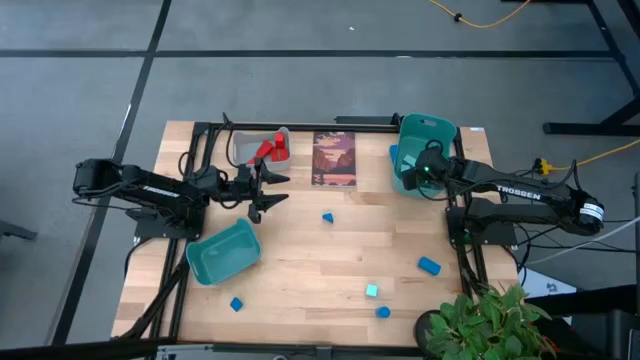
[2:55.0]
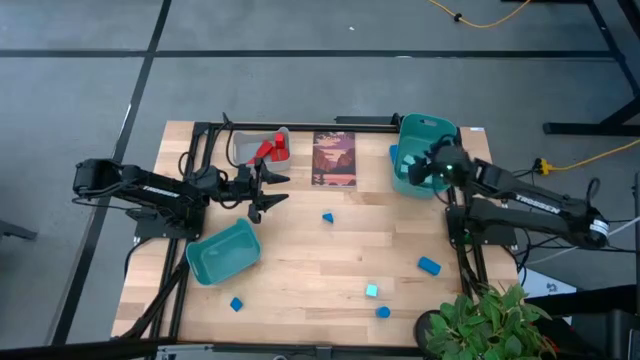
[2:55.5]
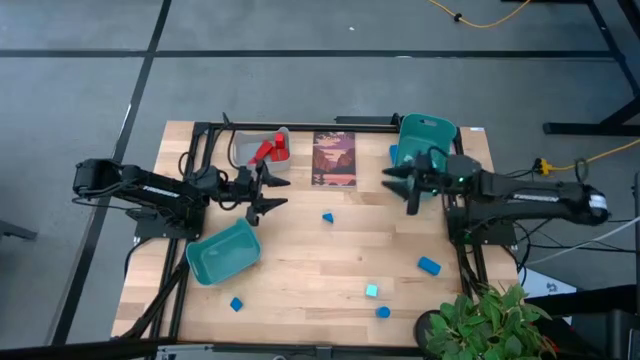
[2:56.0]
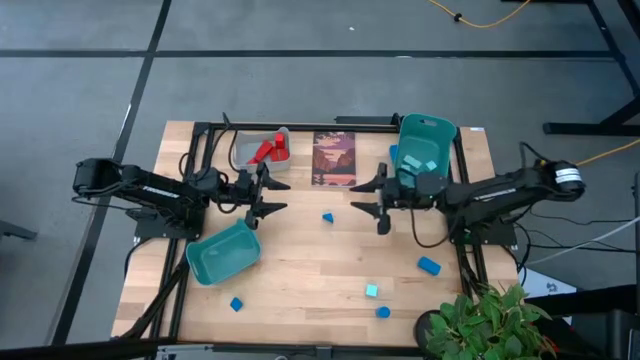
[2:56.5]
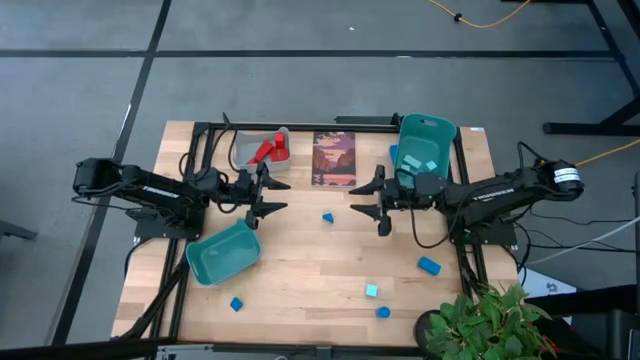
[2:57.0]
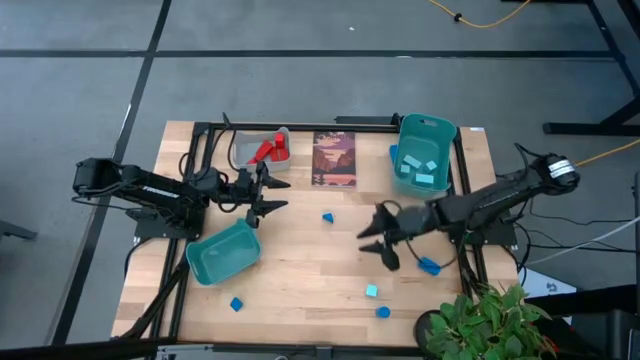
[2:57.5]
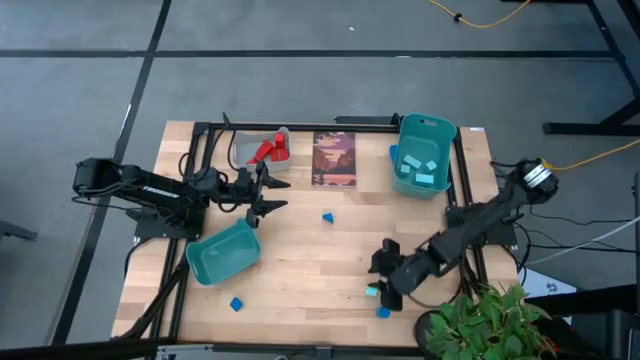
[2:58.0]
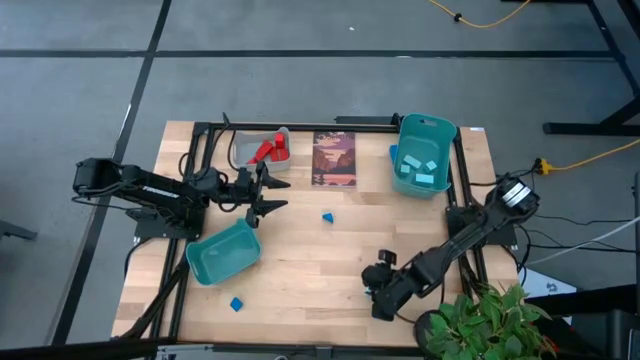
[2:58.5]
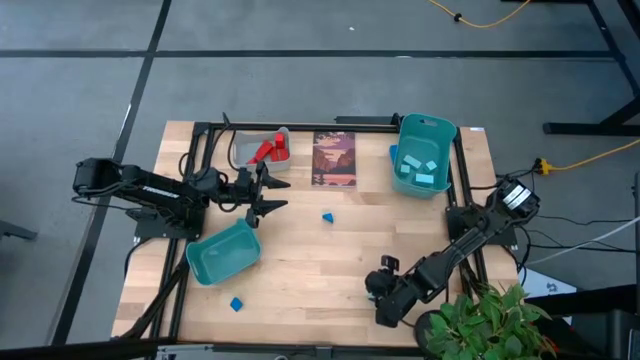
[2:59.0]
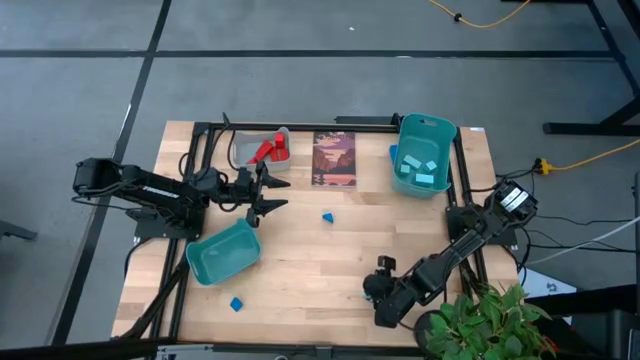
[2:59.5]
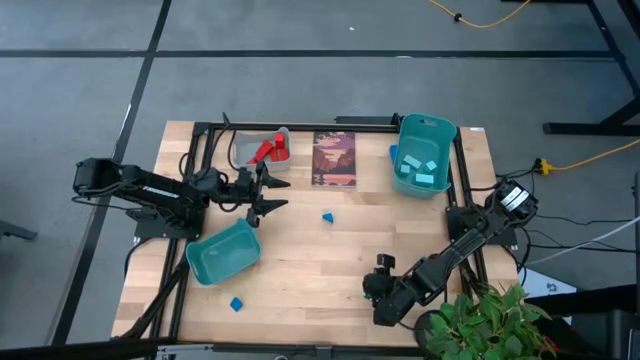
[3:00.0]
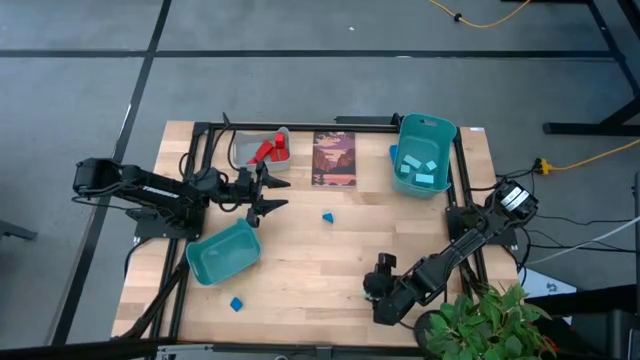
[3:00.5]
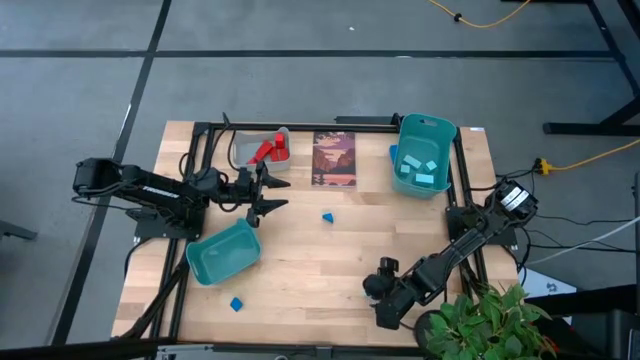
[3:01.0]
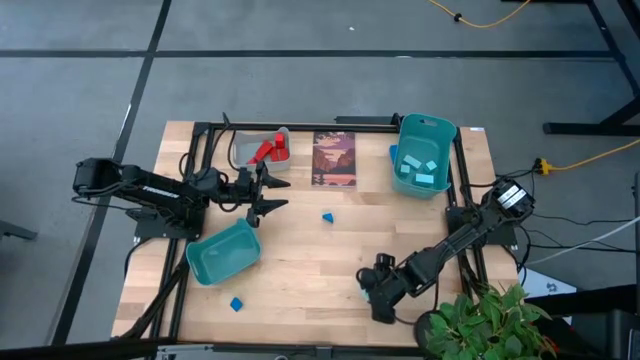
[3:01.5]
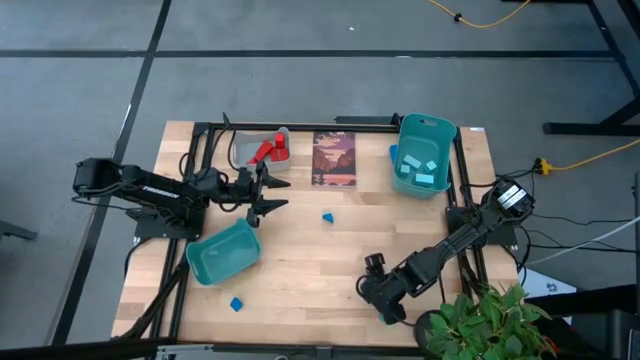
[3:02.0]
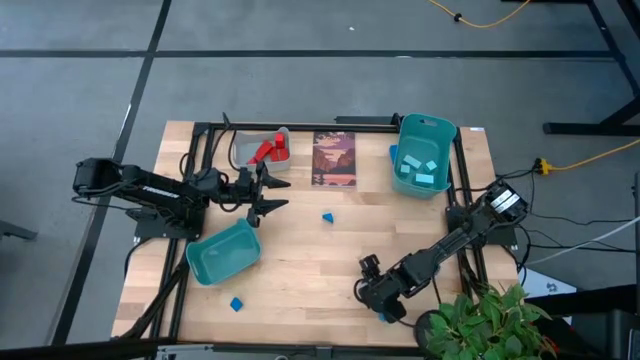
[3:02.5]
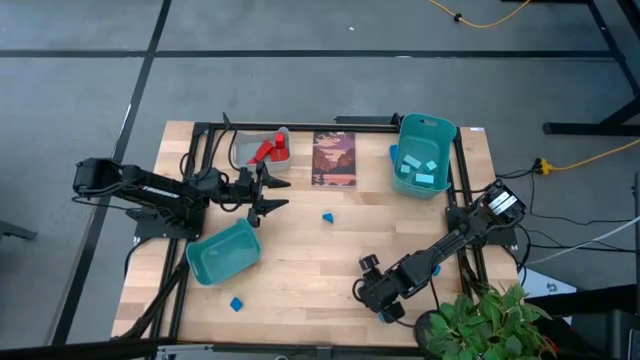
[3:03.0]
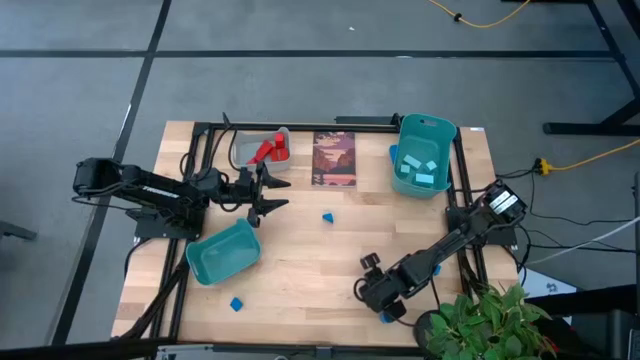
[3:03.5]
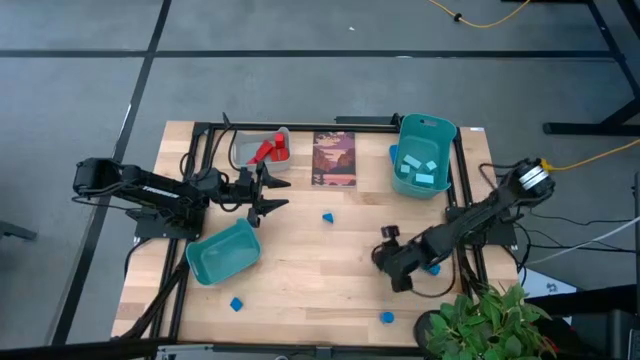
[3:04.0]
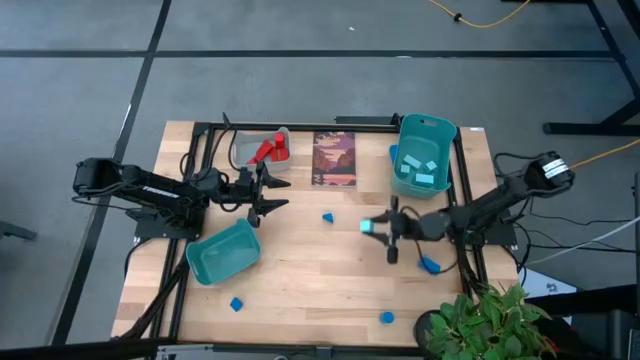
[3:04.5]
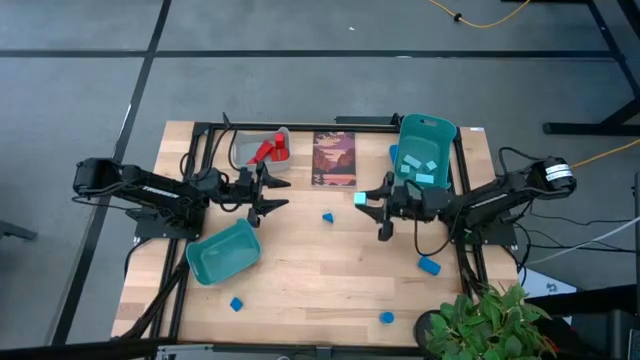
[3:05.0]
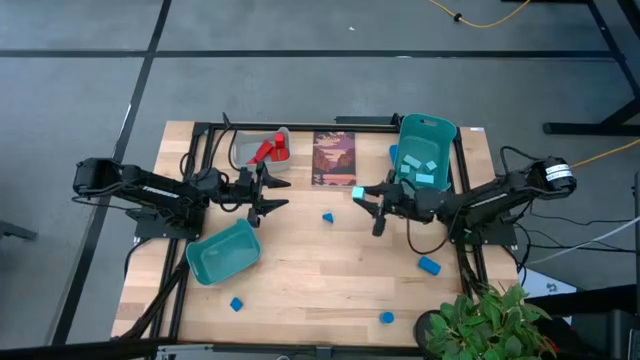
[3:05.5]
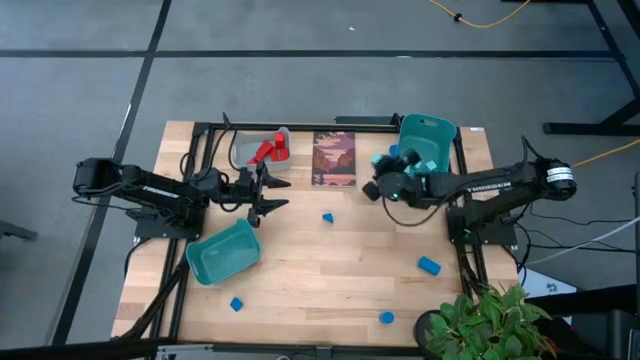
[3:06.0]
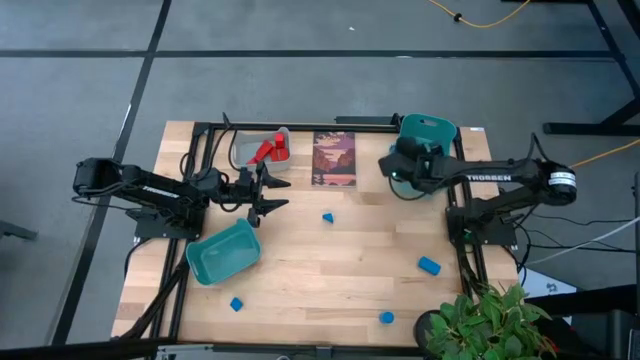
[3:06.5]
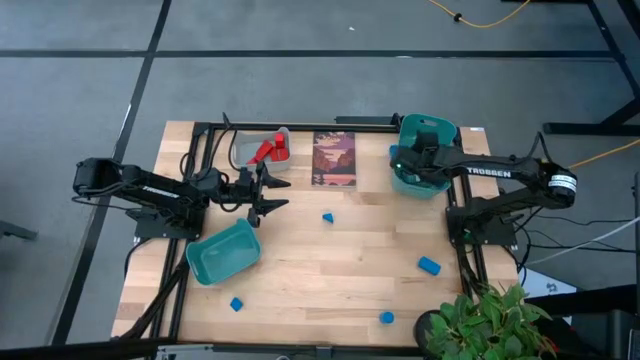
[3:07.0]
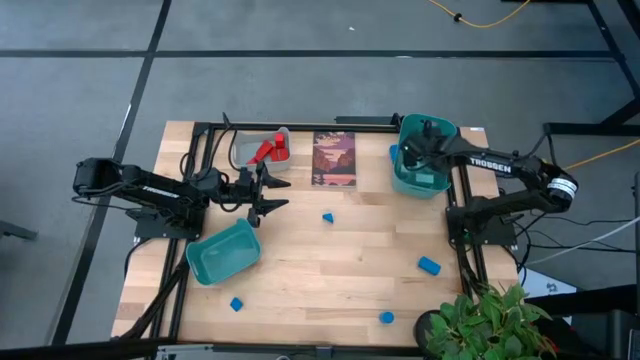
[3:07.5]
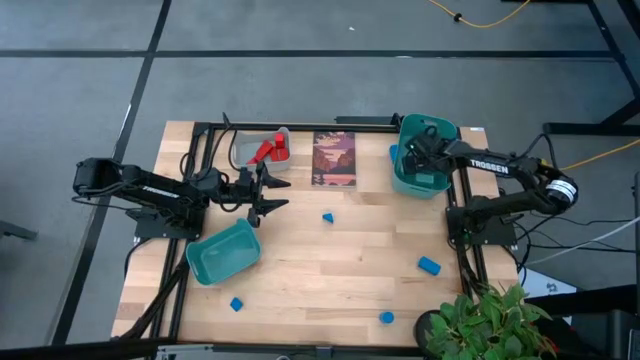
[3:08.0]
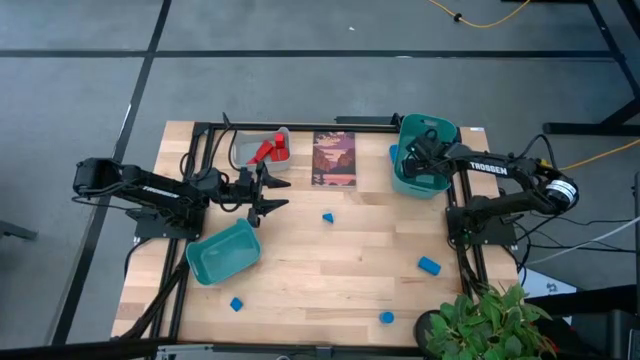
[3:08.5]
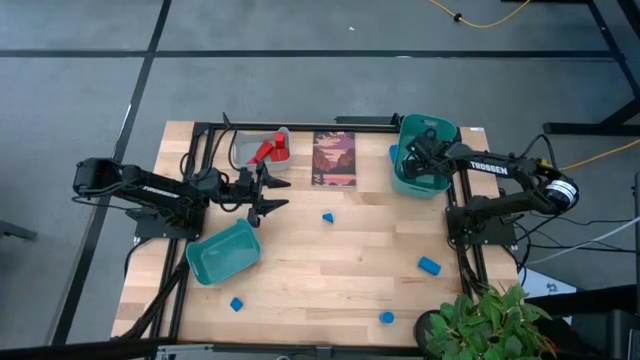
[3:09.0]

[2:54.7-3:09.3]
Task: Sort & place blocks by color
Put the light blue block into the right green bin

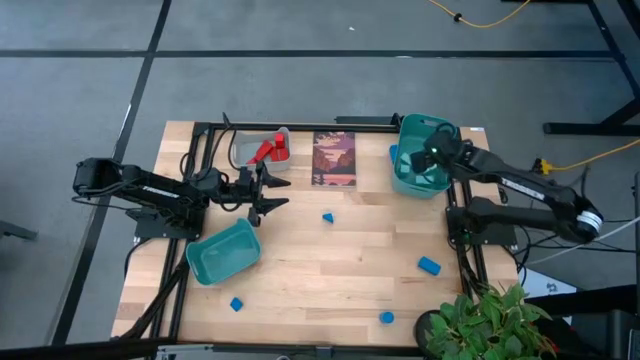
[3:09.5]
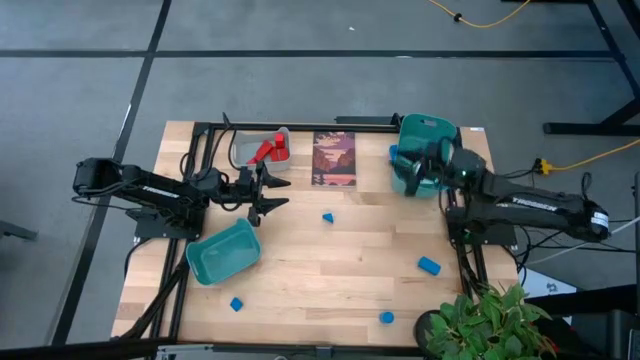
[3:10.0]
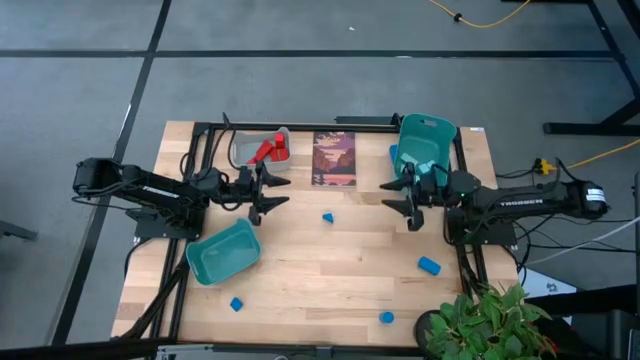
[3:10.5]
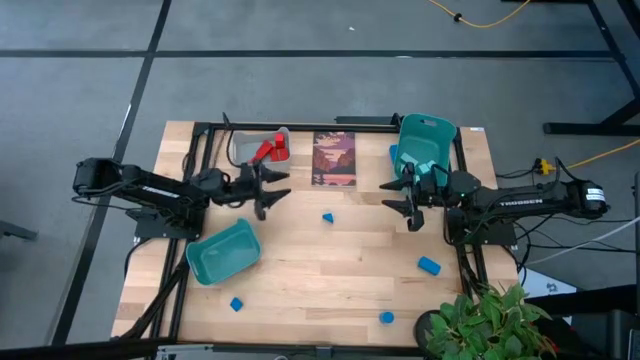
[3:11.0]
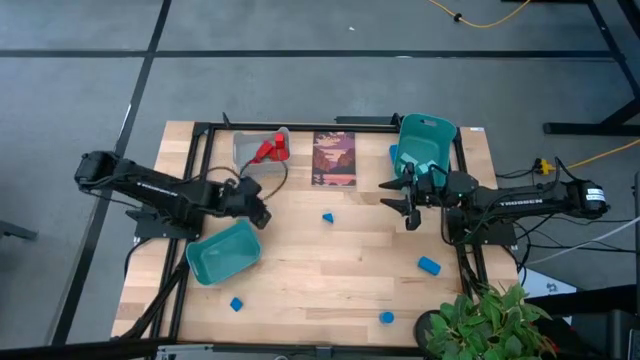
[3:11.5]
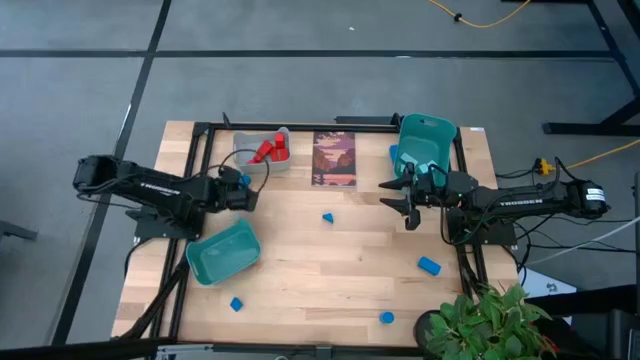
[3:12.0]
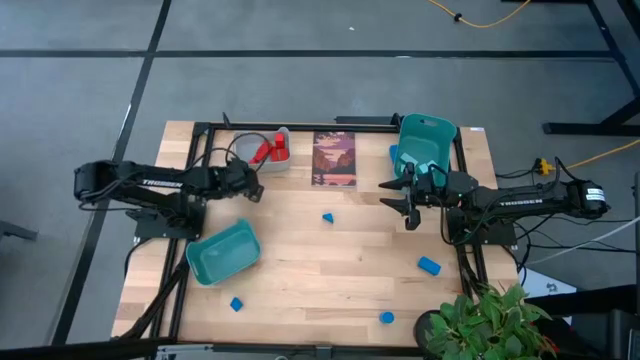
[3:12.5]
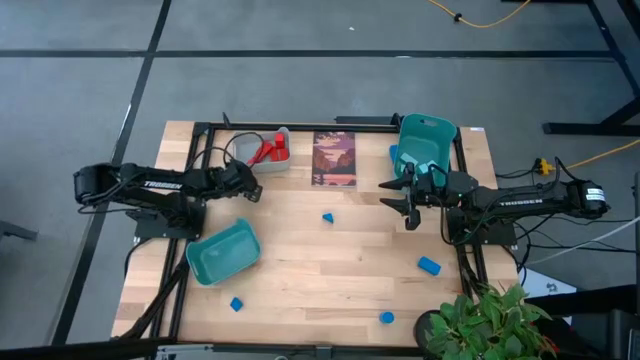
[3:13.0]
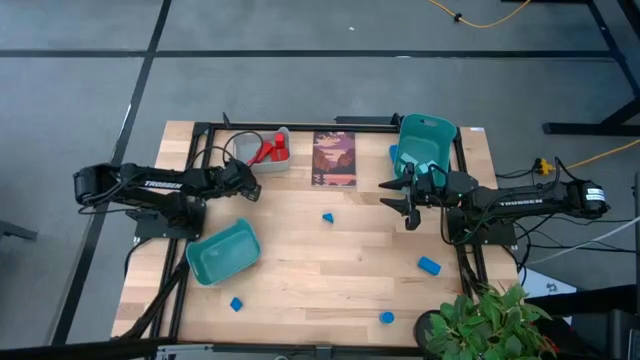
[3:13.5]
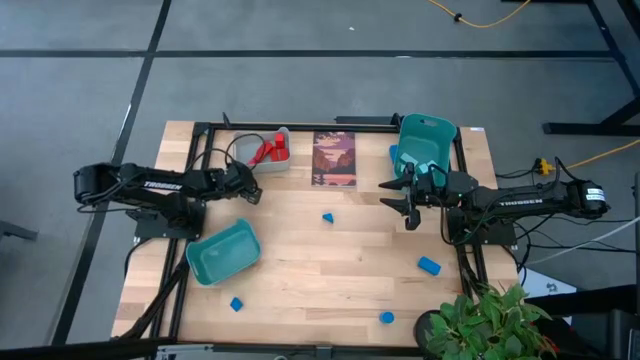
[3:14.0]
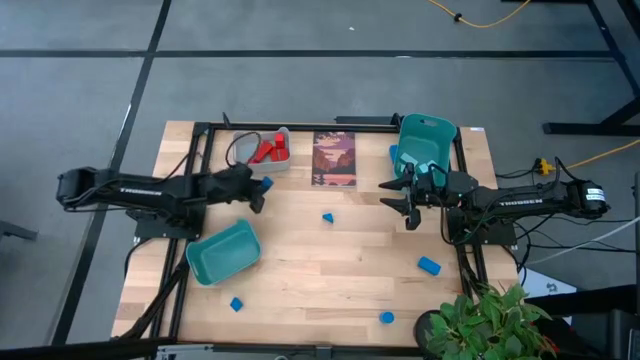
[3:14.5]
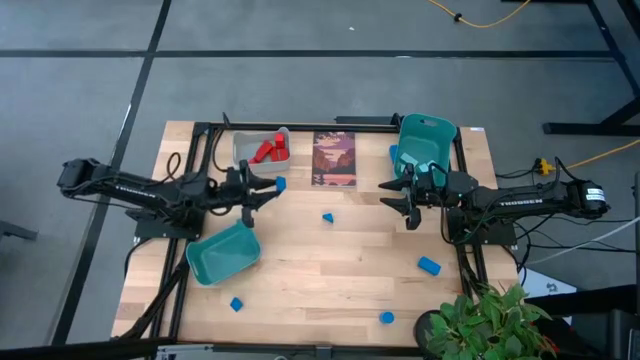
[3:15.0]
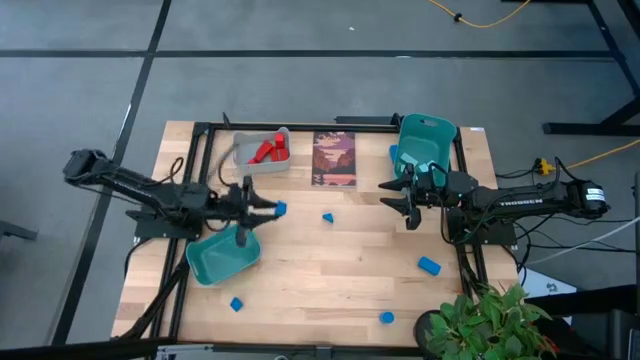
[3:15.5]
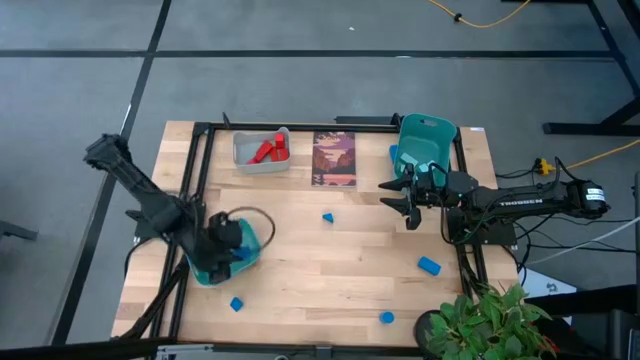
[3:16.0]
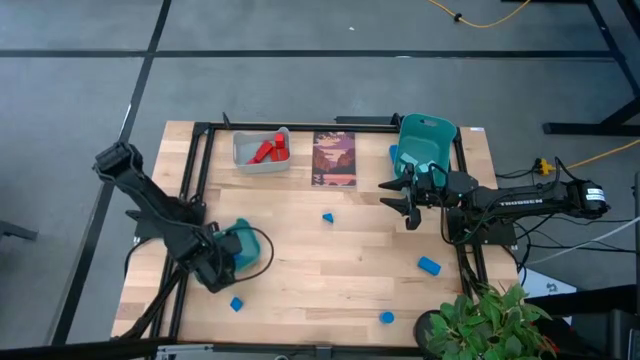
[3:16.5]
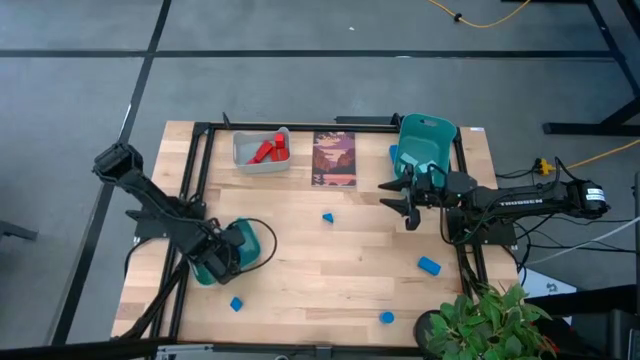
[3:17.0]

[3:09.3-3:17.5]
Put the blue block into the left green bin
